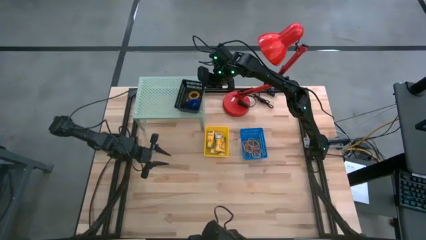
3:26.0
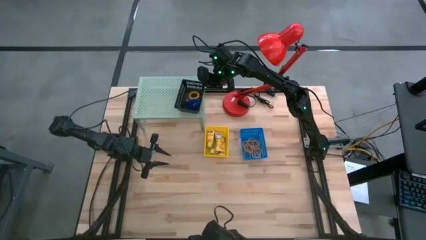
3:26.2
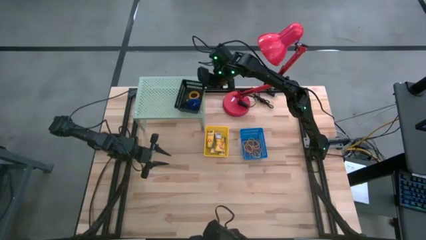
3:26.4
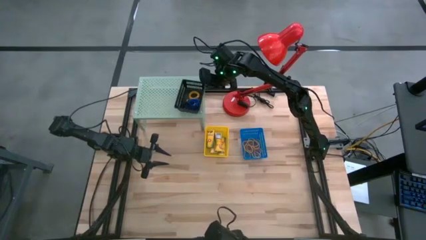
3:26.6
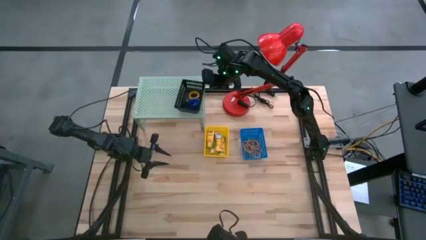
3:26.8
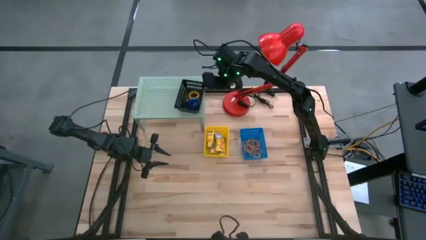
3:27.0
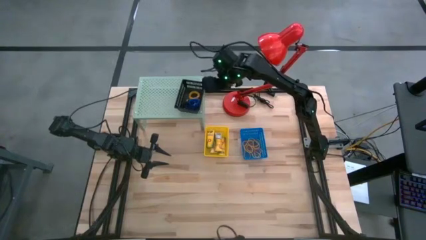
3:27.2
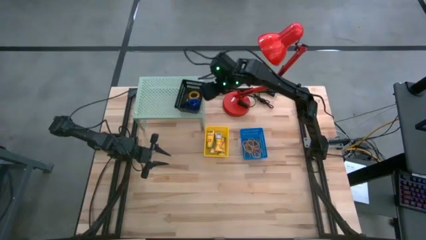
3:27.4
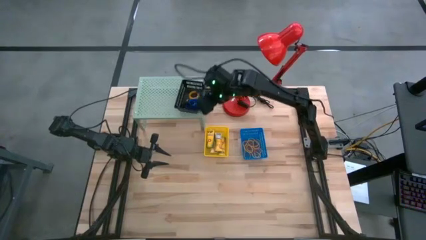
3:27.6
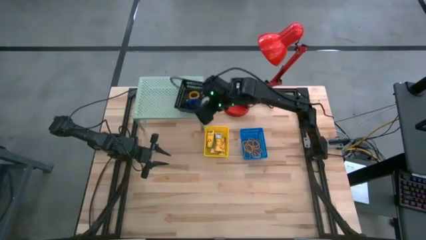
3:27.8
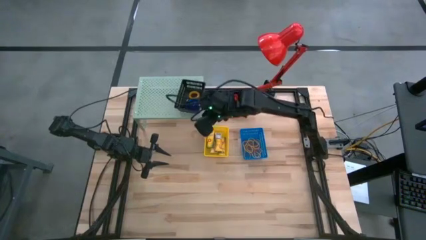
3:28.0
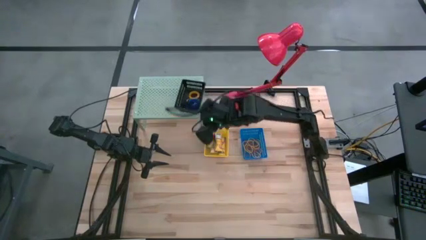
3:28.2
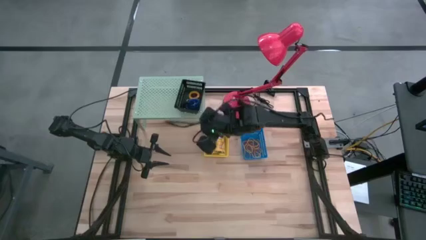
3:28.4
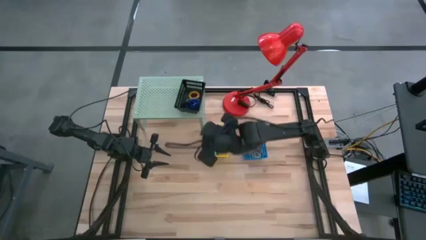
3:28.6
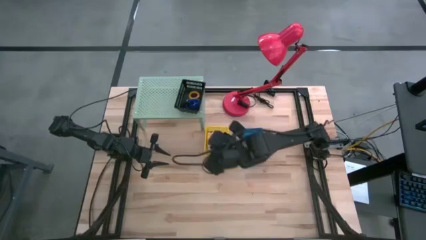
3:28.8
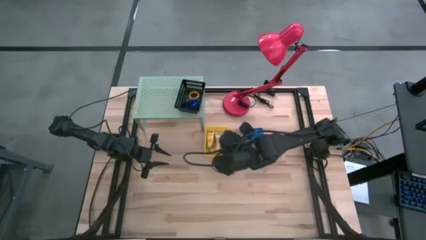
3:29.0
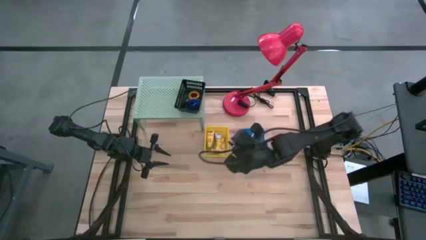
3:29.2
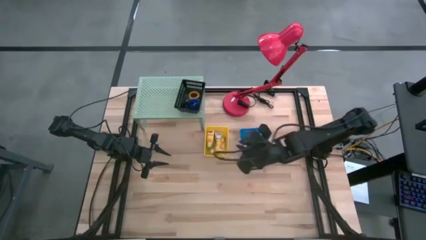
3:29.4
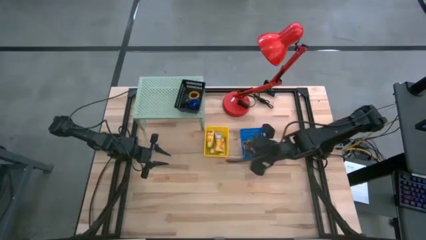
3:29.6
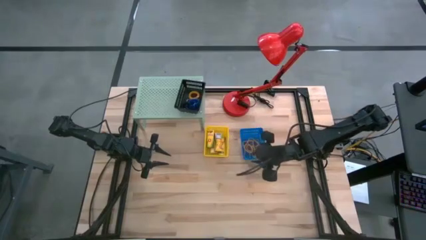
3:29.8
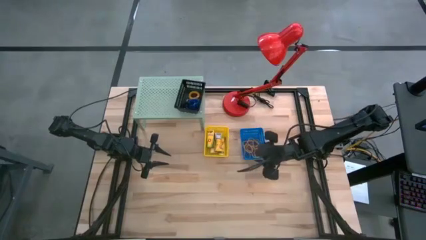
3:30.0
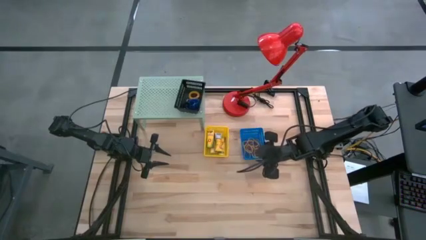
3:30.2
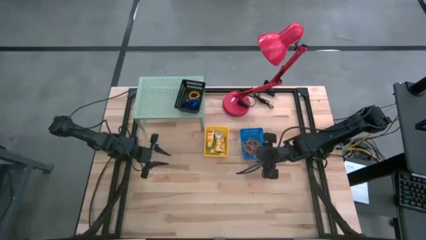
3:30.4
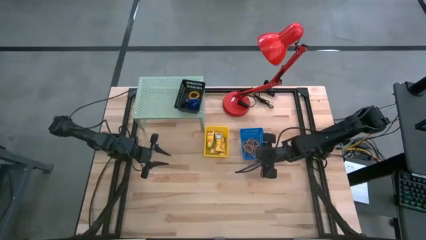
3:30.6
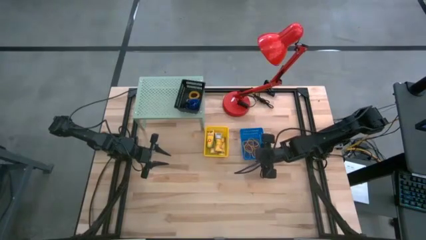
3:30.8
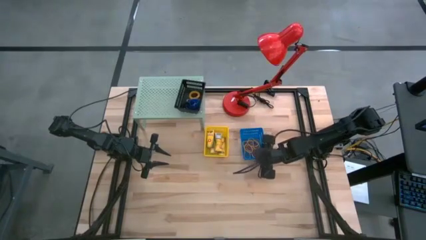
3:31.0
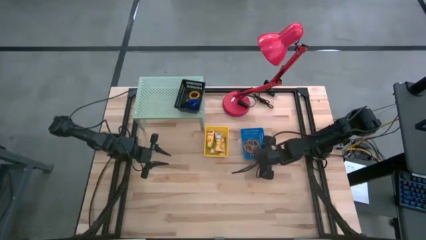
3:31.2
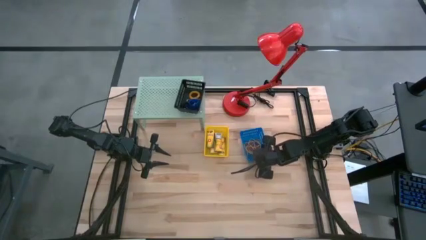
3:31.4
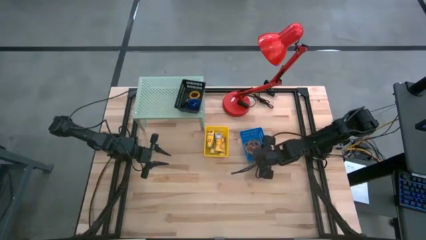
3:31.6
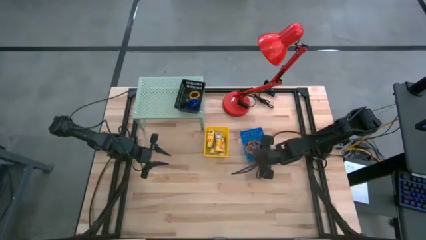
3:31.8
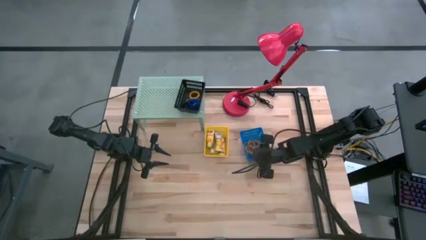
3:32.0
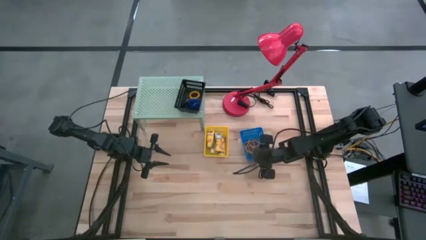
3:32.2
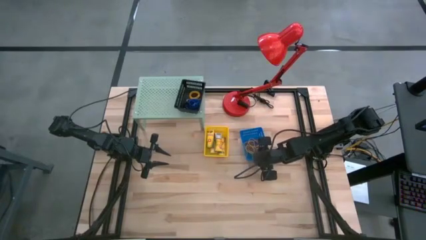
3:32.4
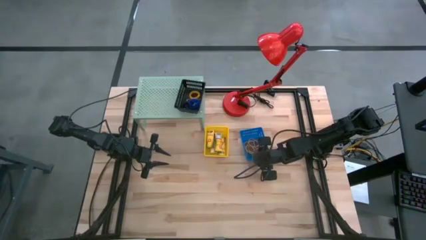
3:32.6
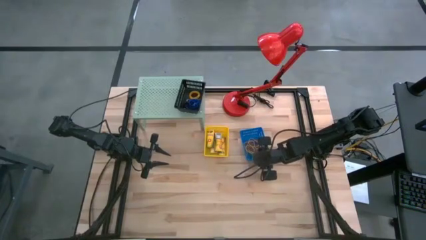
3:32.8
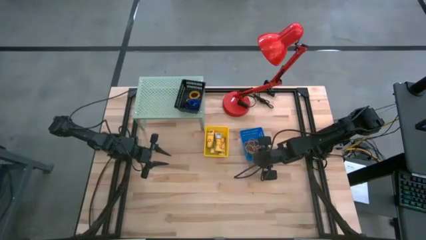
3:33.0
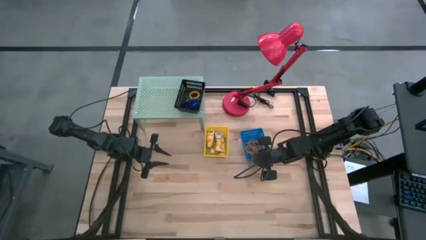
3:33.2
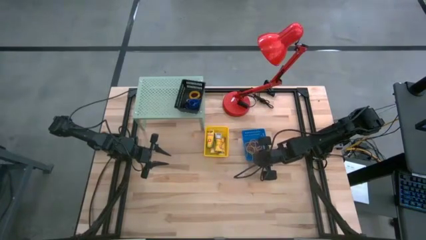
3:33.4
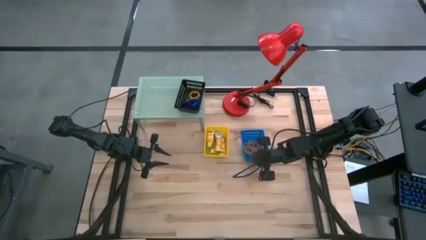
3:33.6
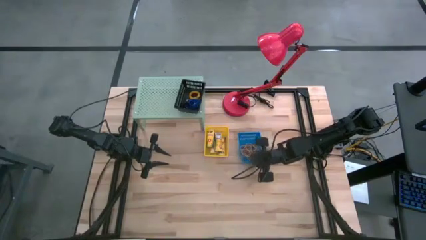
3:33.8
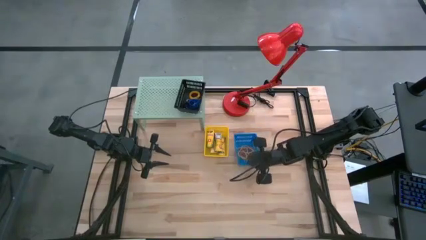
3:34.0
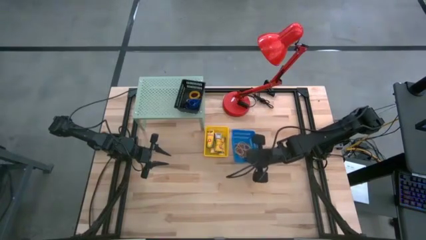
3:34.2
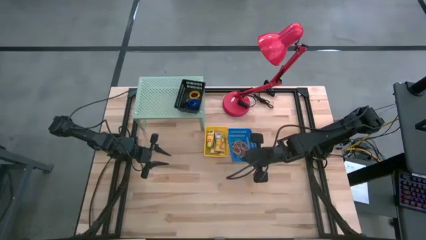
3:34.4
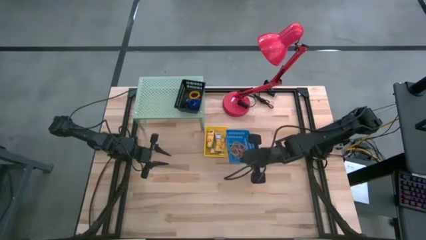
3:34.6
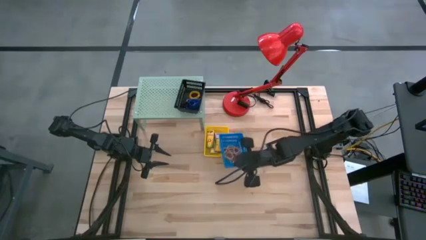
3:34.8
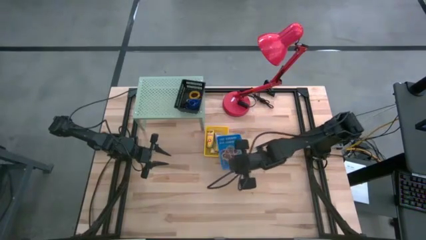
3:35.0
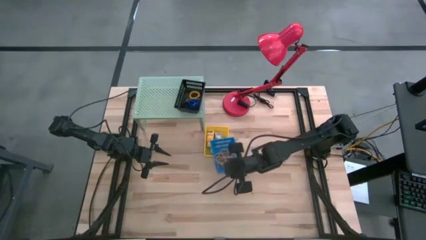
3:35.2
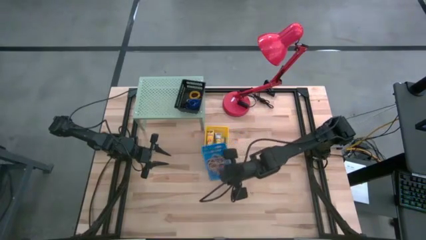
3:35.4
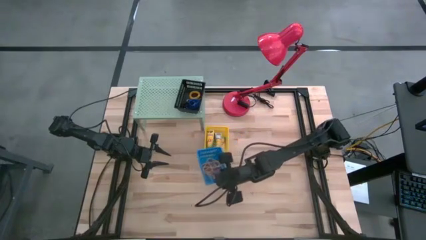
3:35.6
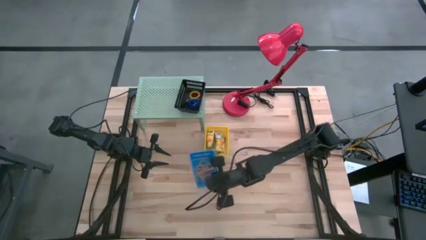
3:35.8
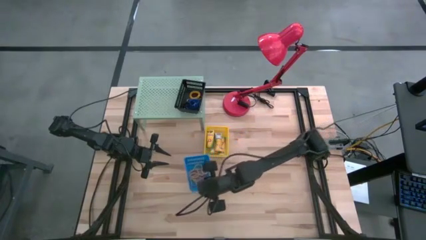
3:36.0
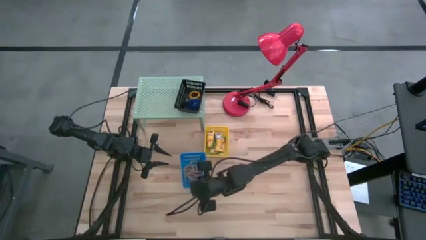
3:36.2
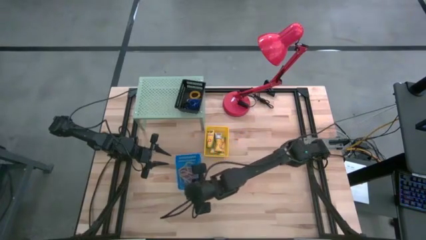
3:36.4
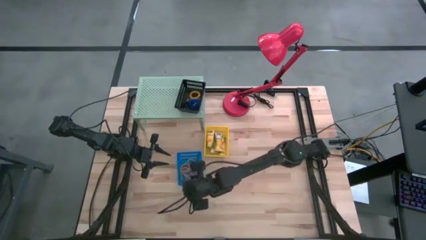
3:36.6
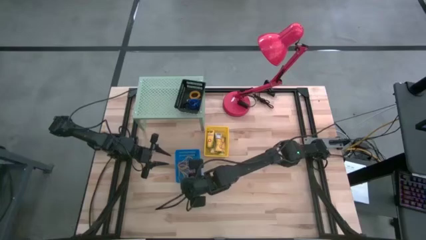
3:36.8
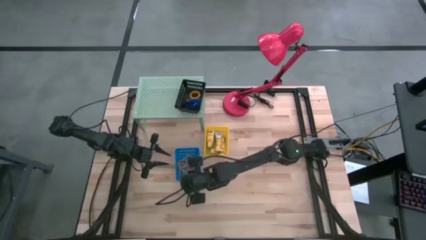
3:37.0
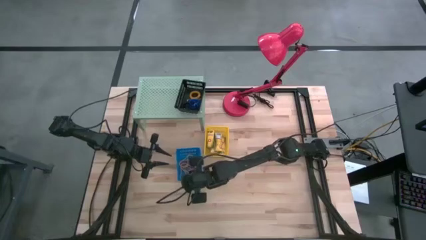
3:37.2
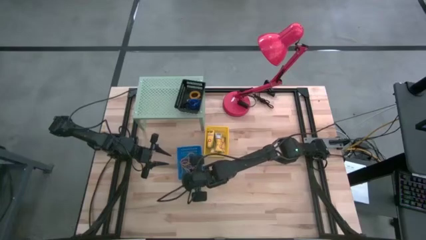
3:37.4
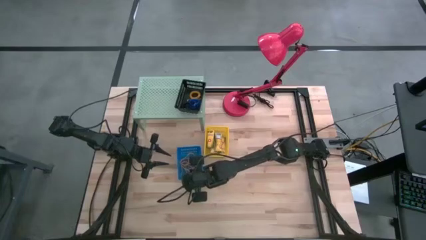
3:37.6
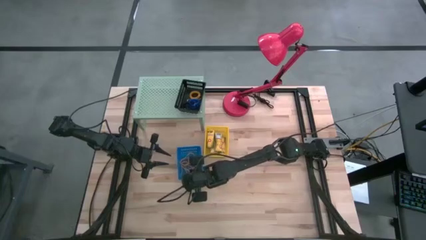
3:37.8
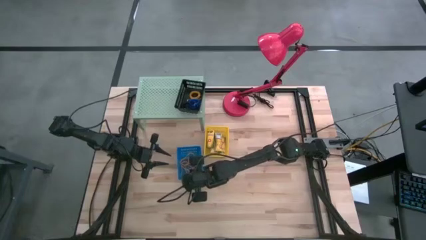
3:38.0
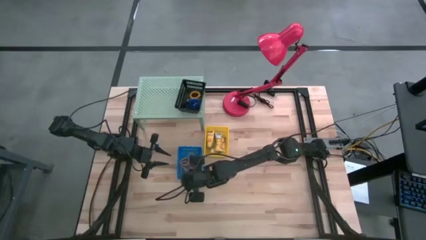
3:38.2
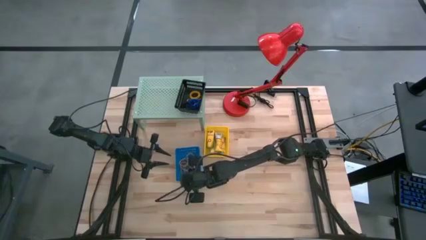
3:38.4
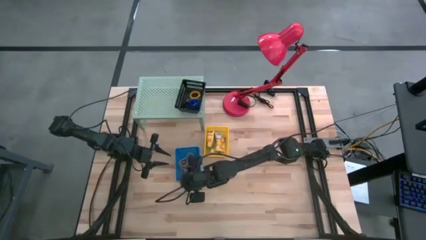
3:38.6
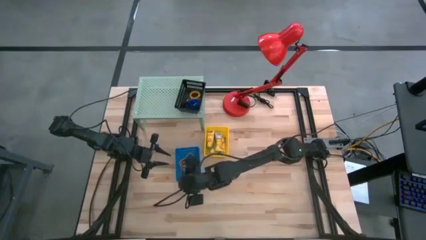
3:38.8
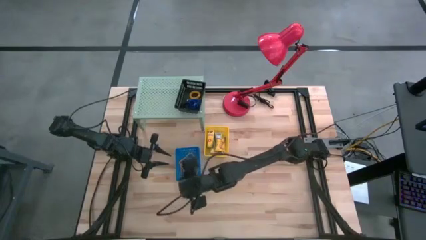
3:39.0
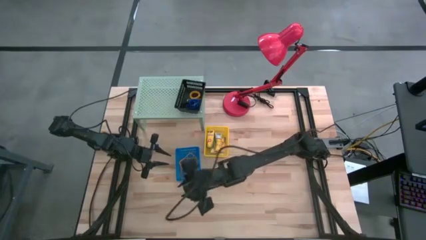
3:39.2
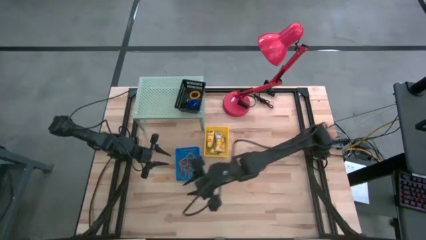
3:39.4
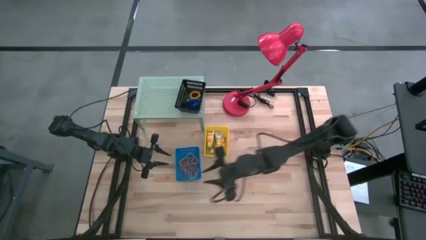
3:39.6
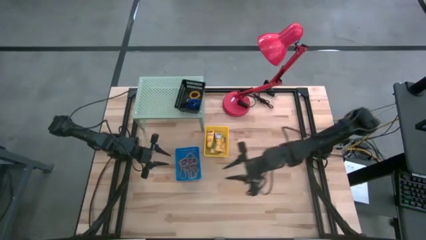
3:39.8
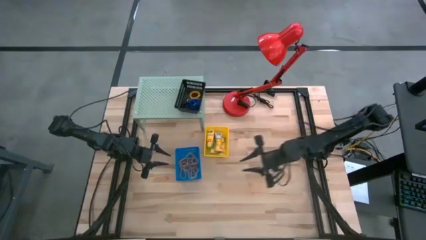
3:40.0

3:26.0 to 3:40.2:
Task: Pick & Place Office Desk Supplies
Put the blue basket filled with rubber bands on the shelf

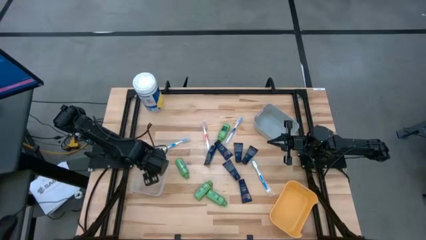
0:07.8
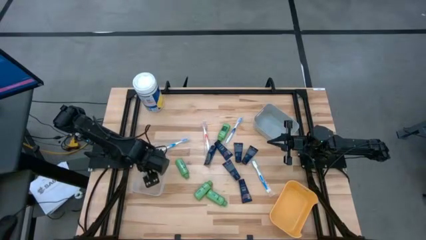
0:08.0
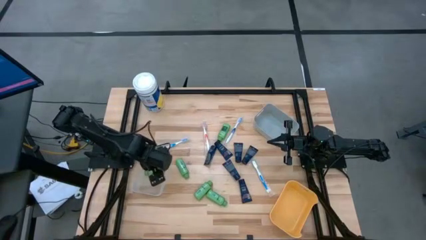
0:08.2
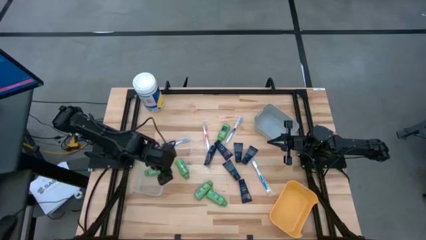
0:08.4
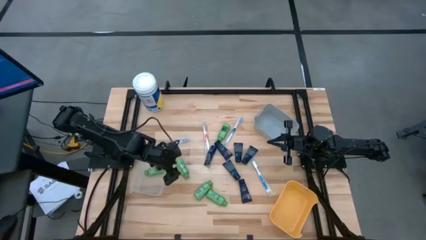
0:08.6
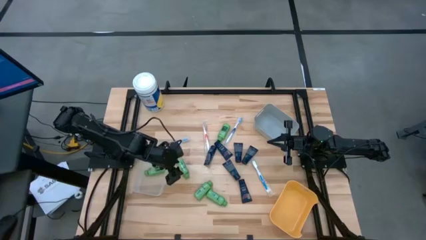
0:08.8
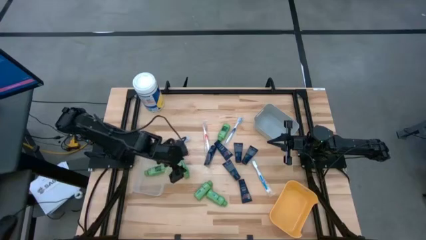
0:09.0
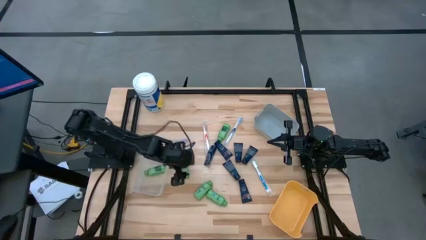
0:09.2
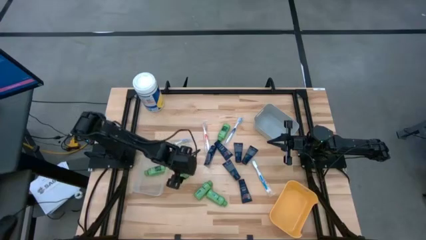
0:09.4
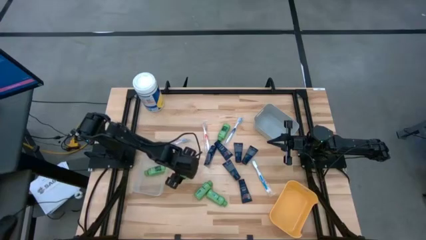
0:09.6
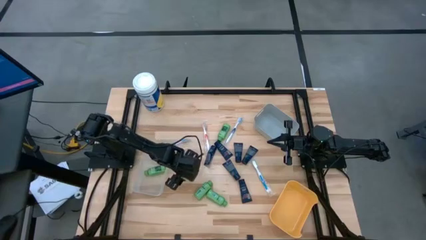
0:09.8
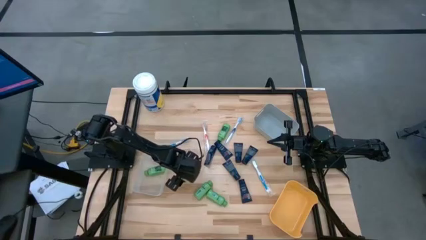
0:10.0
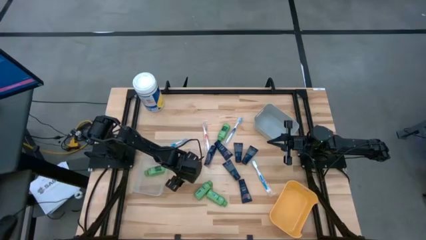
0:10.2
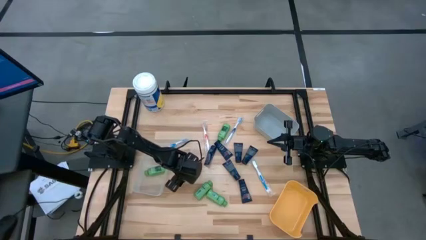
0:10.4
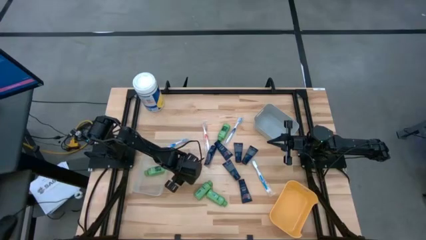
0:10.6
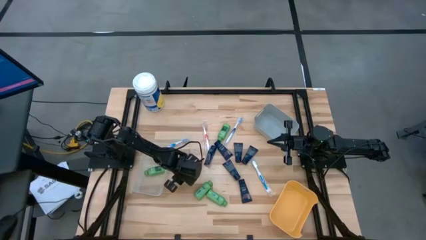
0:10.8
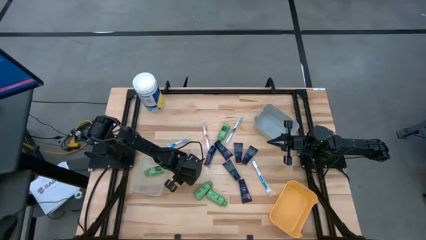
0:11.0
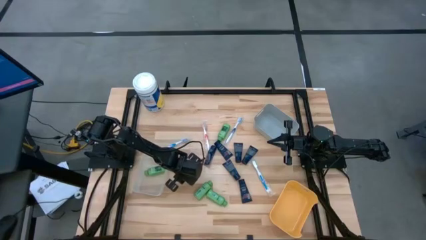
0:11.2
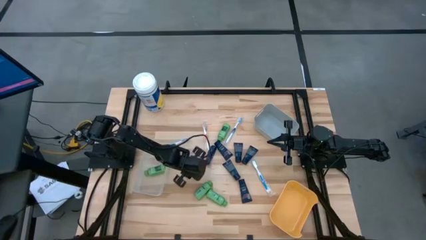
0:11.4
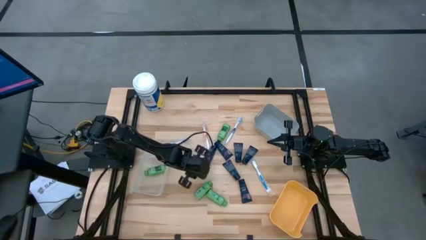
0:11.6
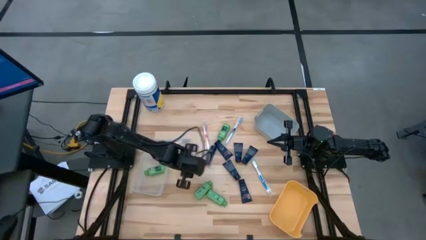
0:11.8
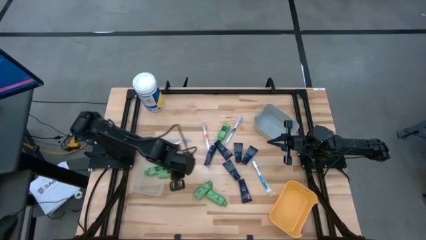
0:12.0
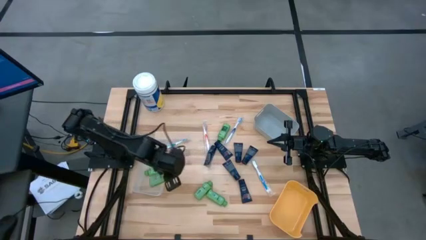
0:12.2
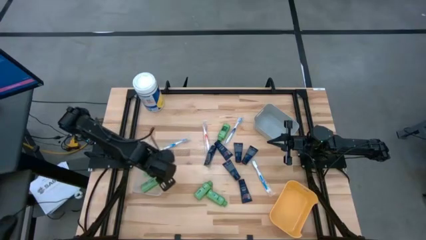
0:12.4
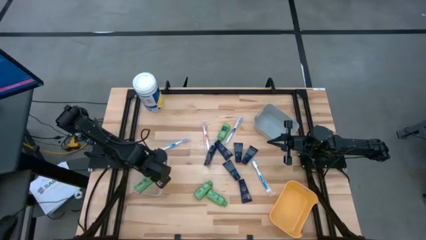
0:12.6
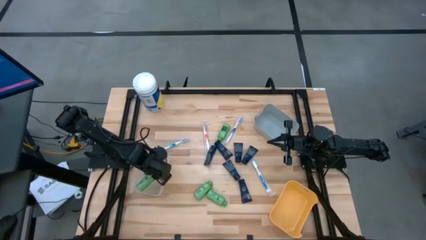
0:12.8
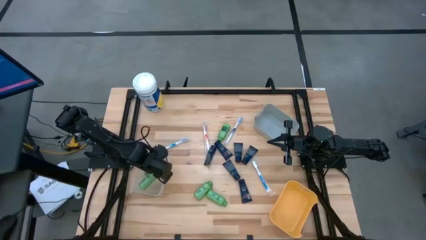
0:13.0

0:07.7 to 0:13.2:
Task: Pick & Place Travel size toiletries
Put the green shampoo bottle into the transparent bin
